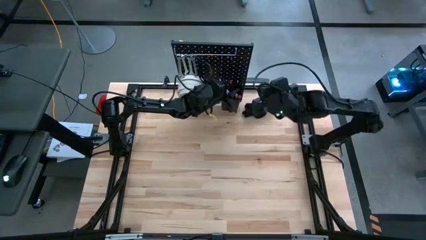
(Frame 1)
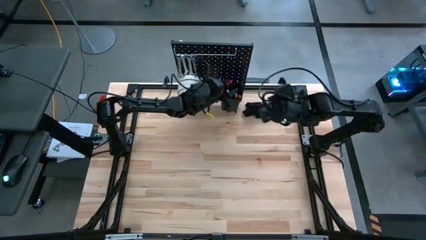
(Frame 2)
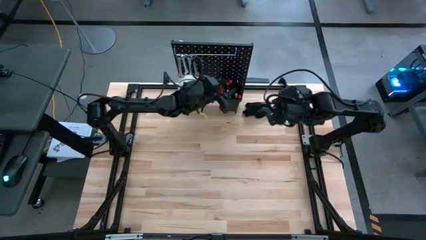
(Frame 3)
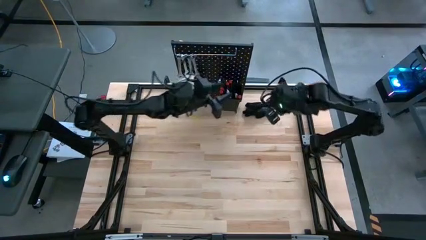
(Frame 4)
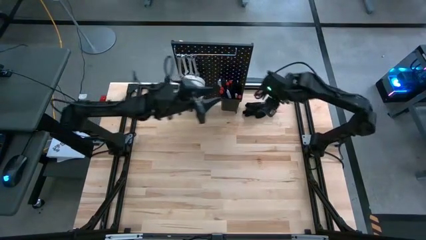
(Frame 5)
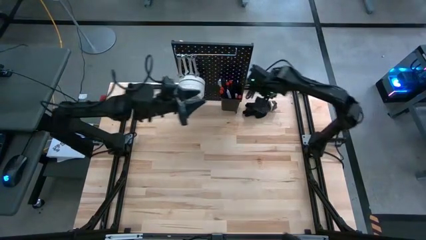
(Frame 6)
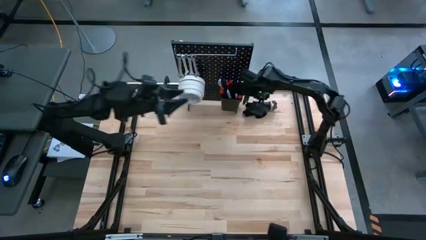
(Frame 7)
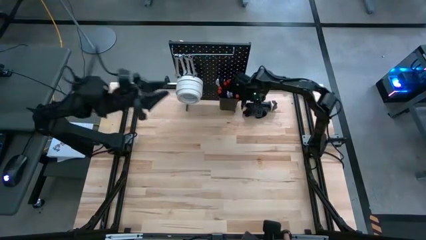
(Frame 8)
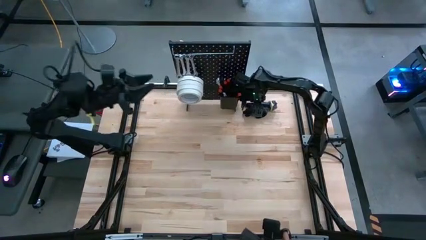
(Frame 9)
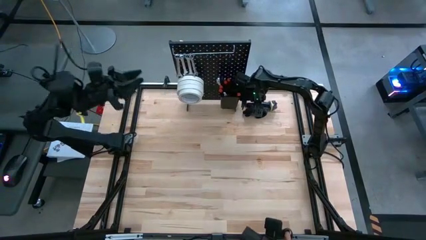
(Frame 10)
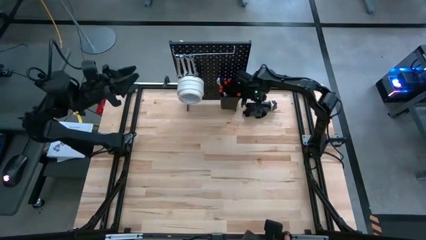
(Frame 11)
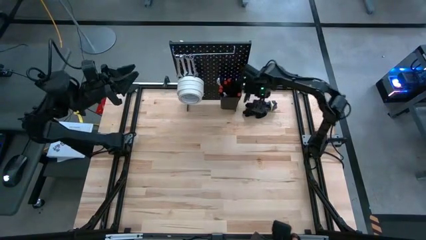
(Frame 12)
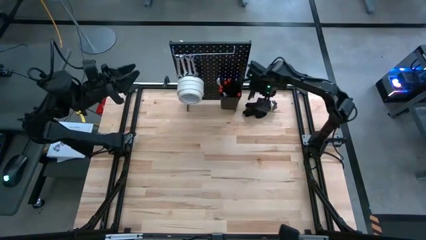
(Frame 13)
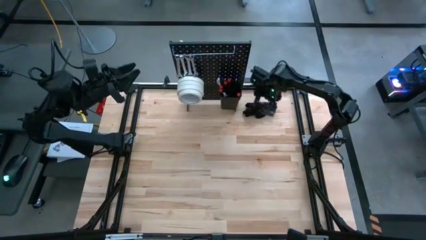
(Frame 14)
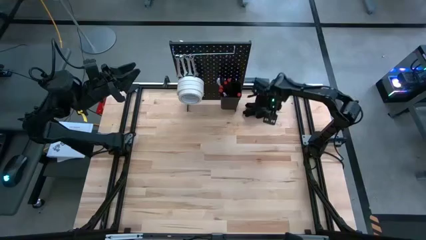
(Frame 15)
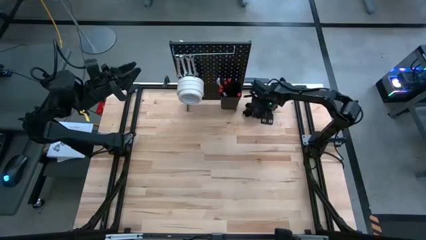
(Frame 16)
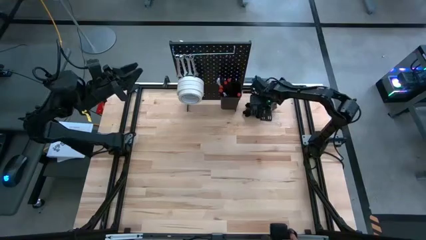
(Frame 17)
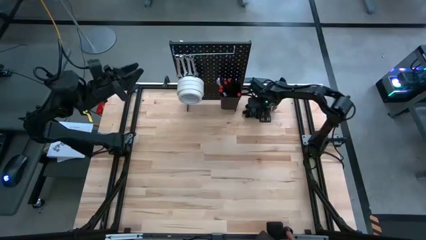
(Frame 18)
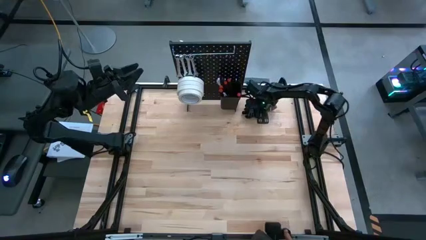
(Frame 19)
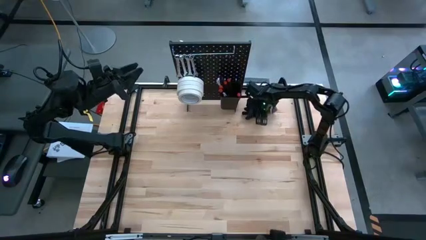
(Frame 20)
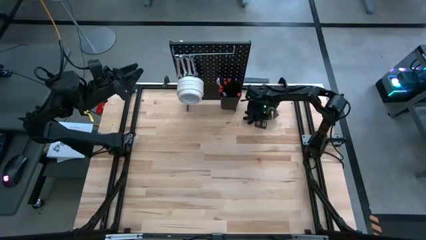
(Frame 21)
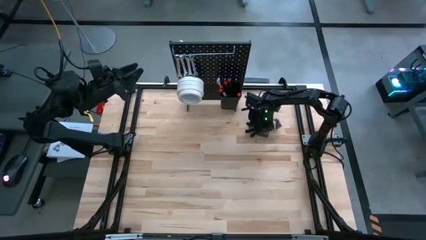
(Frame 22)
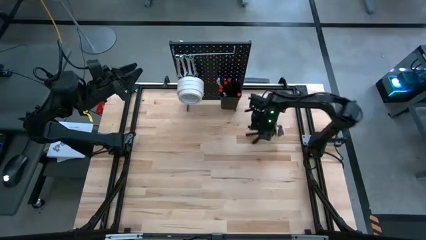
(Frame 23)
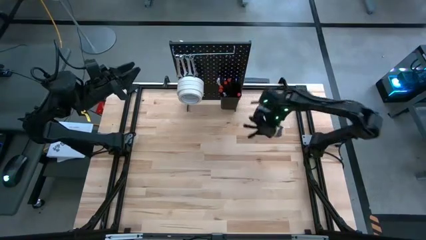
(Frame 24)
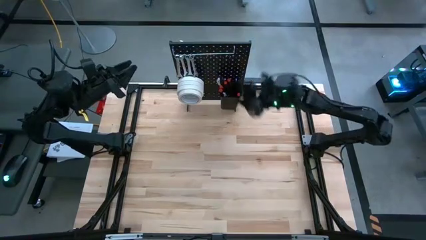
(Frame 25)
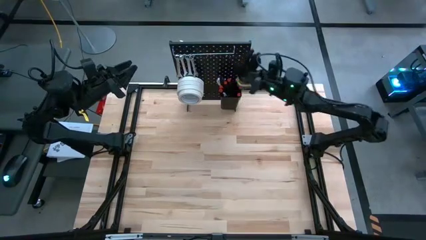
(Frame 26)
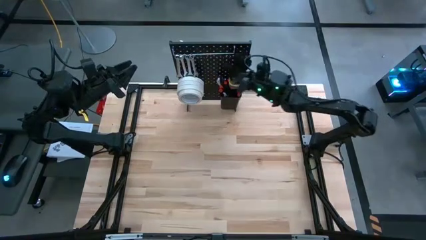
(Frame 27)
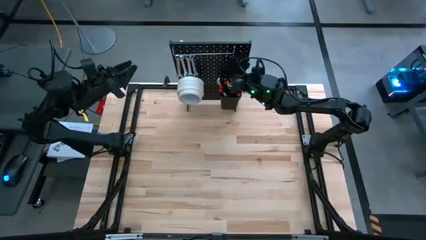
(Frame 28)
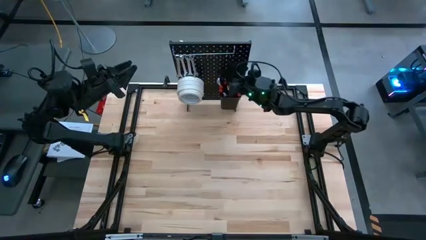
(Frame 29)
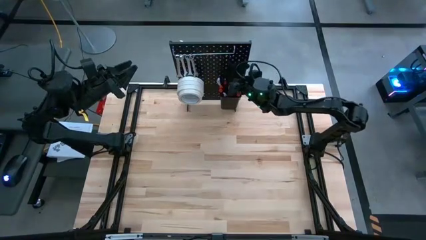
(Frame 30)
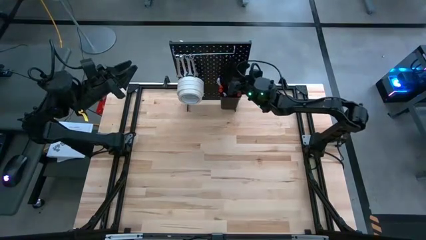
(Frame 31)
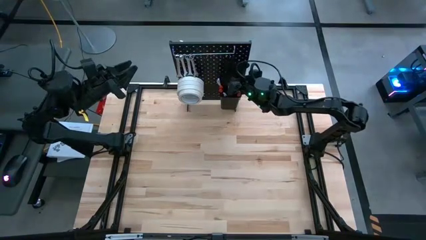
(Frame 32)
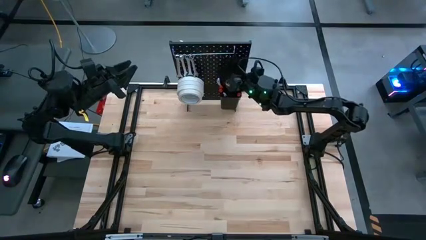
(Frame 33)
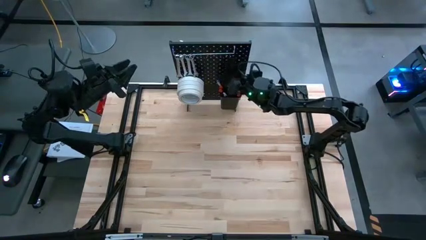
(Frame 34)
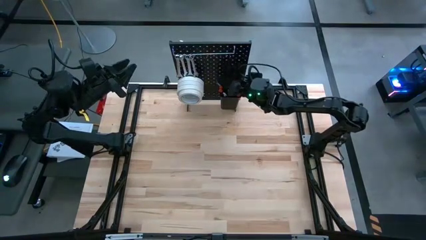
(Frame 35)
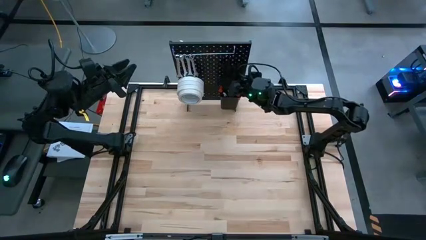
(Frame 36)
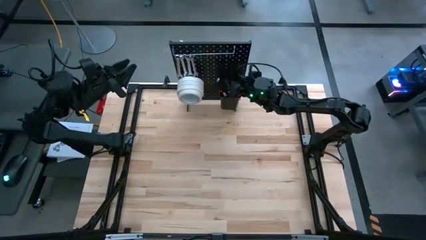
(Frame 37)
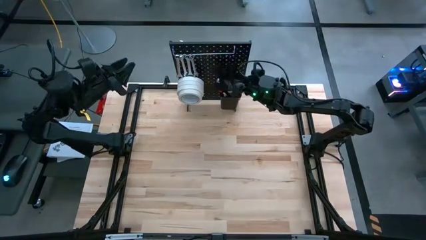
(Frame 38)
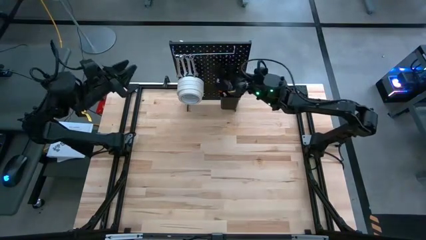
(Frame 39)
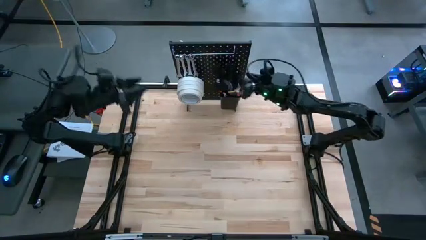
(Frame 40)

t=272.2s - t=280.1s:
Task: Hang tools onto peg board
Put the gloves into the black bin on the pegboard

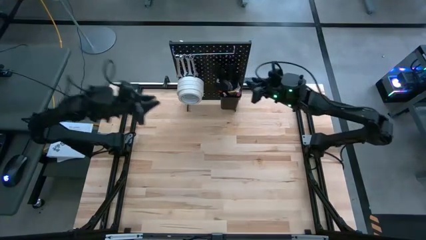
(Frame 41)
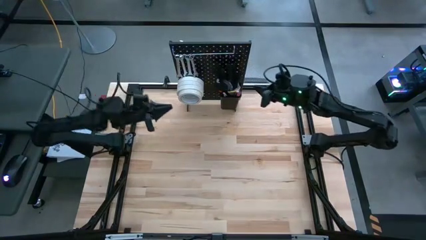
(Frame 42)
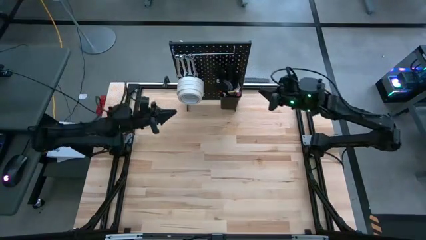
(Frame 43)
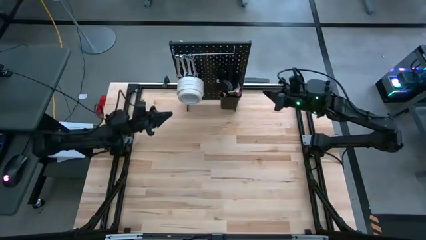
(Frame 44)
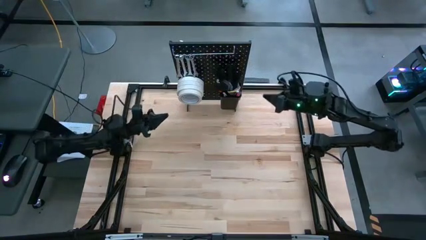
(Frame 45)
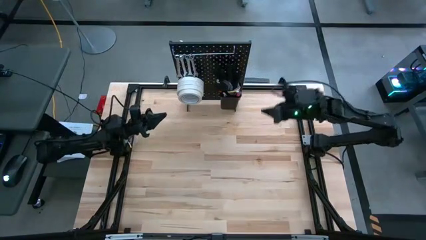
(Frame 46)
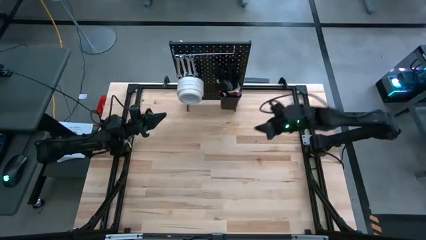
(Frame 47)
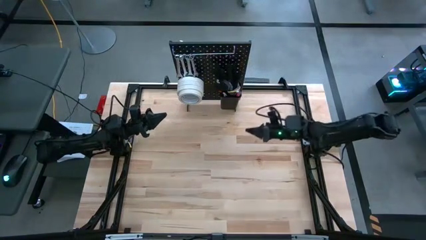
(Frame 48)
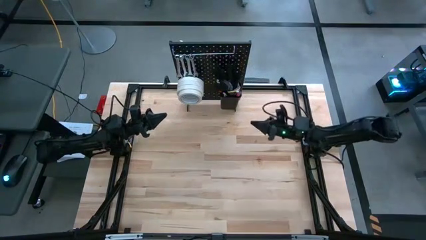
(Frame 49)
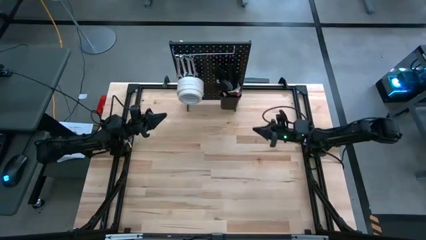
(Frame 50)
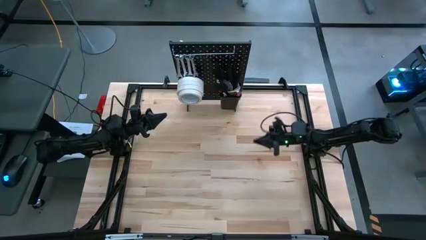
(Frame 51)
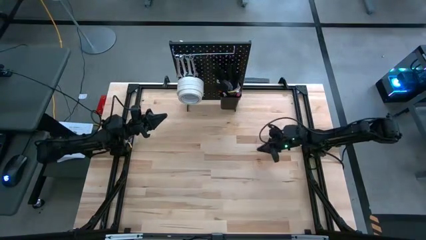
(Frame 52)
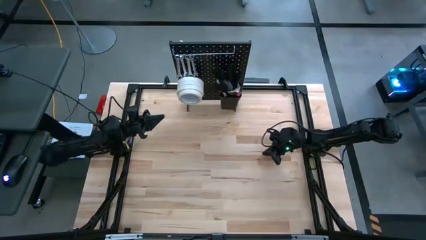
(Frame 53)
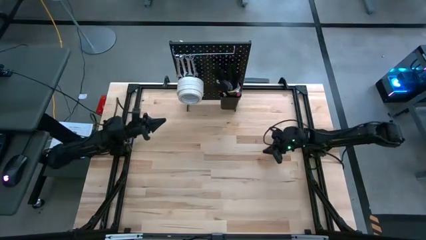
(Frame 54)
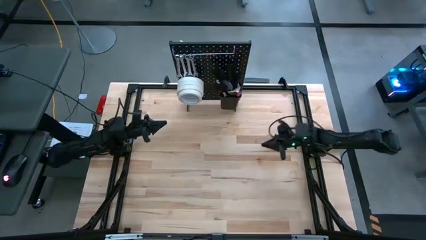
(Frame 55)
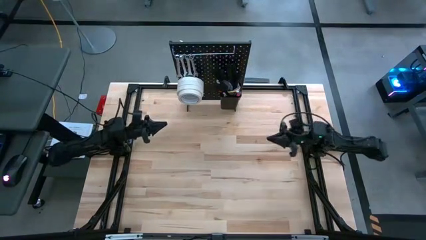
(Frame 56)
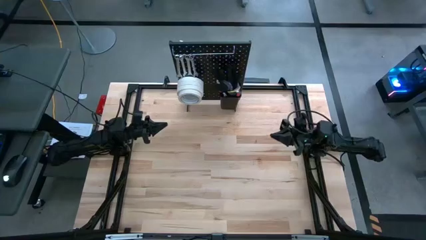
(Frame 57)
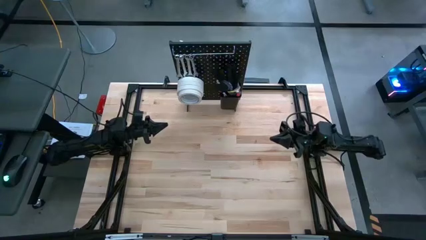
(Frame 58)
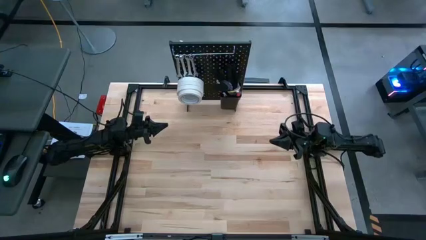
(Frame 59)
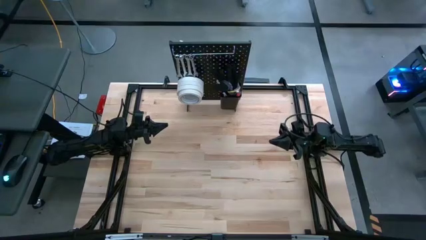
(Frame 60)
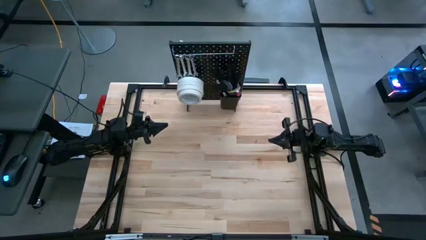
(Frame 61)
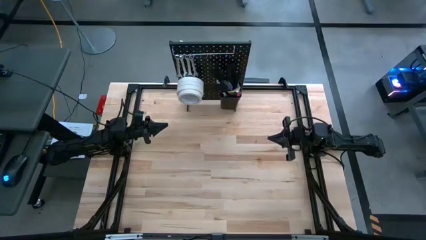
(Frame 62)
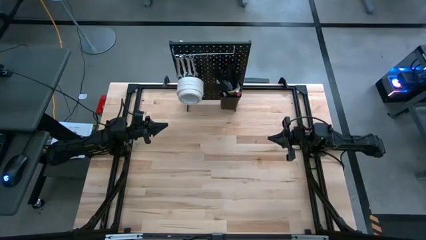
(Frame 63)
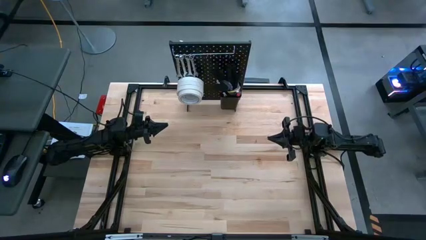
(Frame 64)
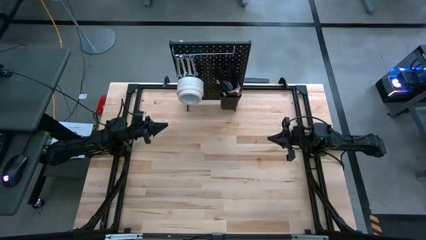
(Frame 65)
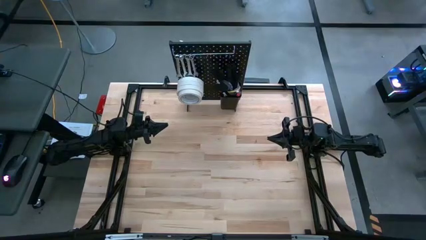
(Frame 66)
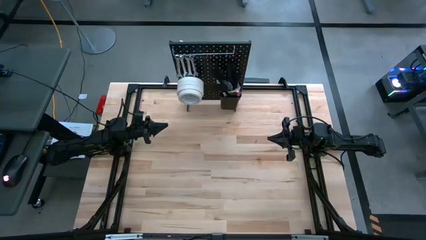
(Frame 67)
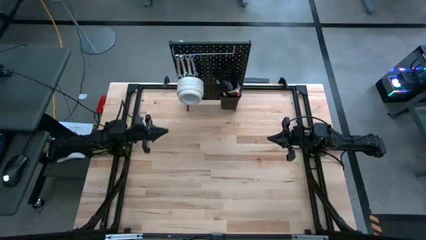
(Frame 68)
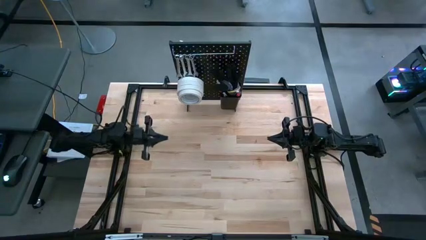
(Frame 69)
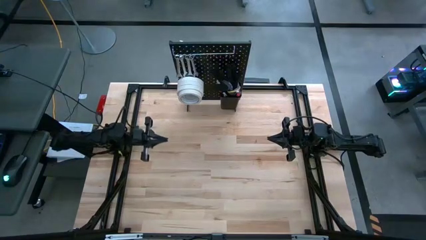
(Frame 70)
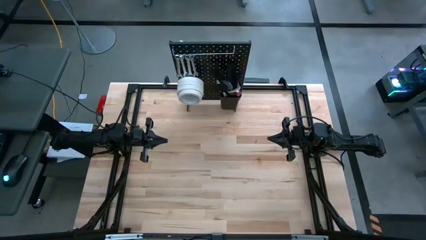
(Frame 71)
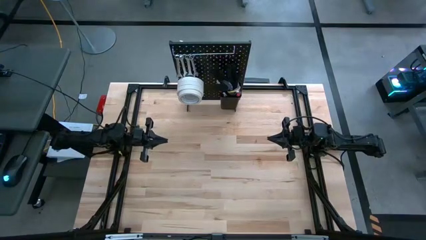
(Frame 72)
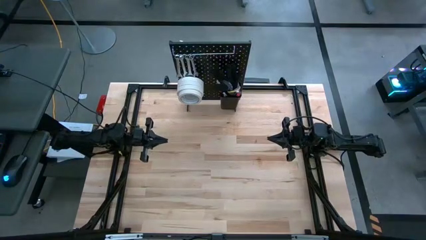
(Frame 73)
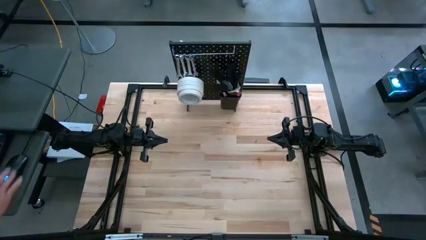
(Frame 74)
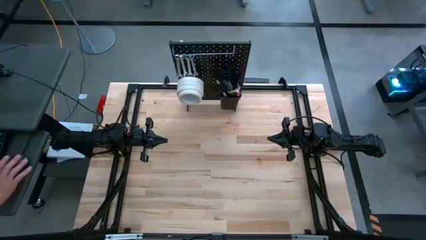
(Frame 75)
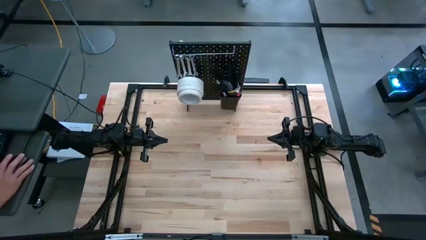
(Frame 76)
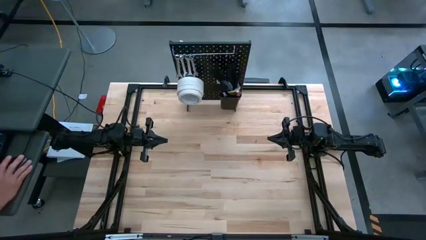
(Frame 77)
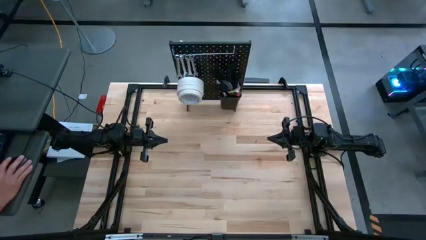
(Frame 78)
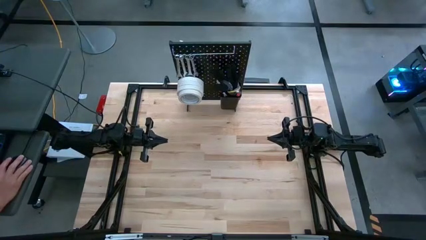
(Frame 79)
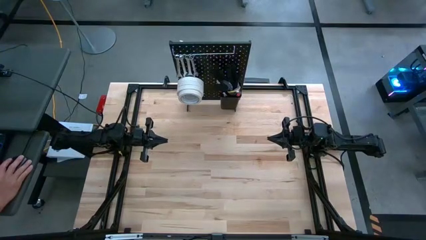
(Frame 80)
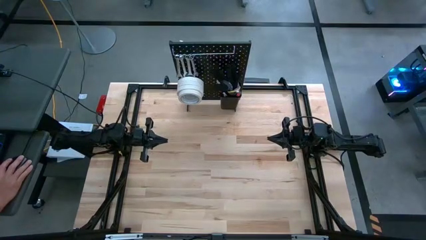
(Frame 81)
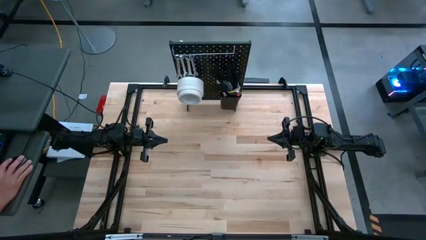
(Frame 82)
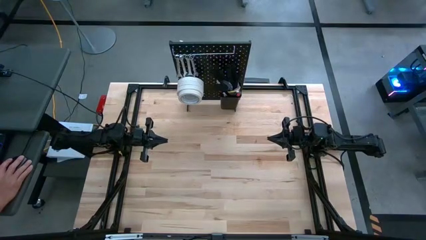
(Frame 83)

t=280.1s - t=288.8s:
Return to Home Position
